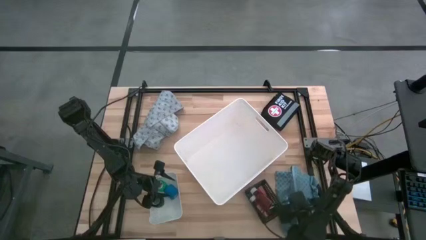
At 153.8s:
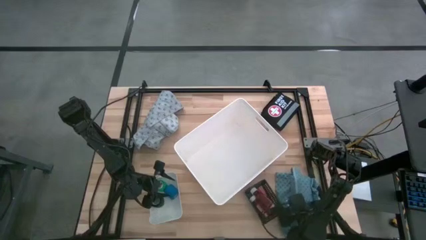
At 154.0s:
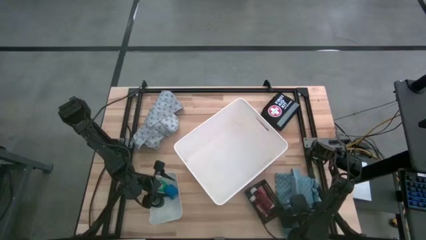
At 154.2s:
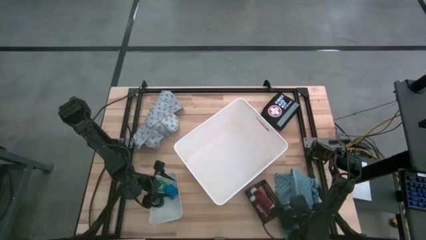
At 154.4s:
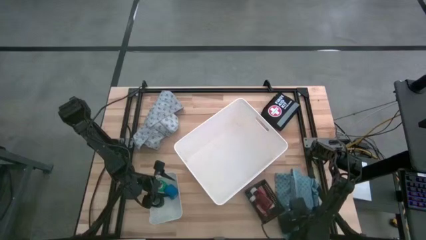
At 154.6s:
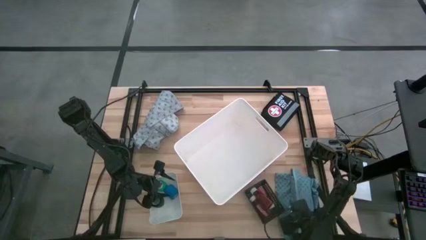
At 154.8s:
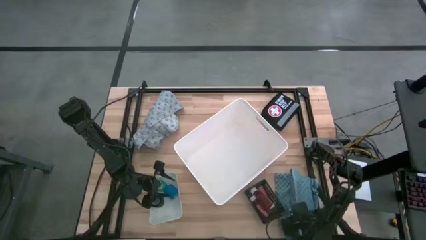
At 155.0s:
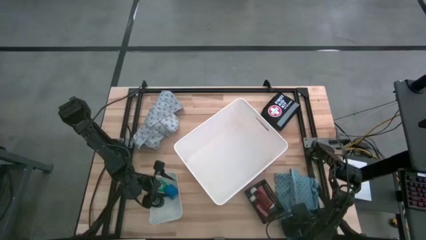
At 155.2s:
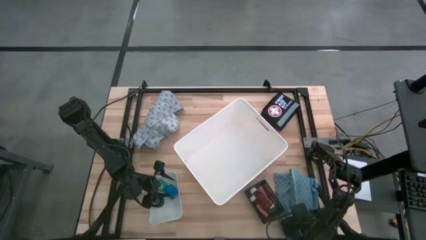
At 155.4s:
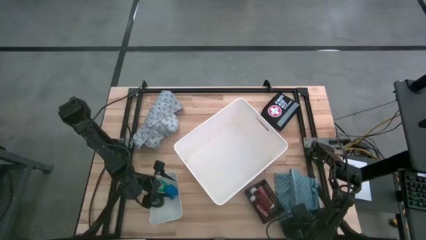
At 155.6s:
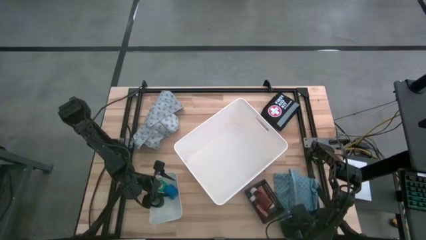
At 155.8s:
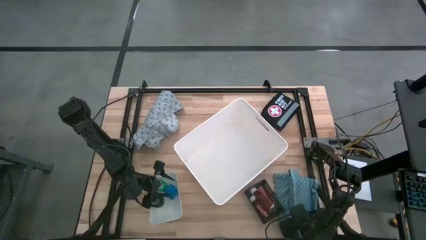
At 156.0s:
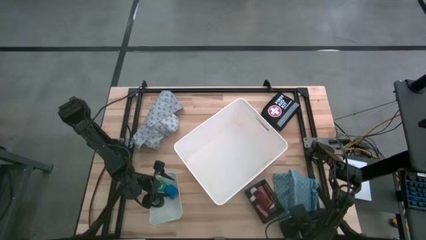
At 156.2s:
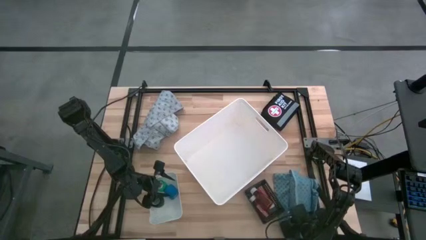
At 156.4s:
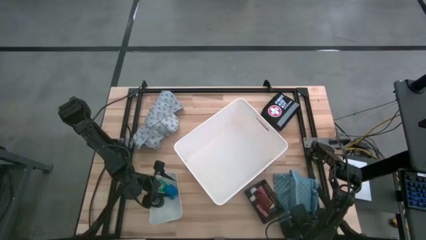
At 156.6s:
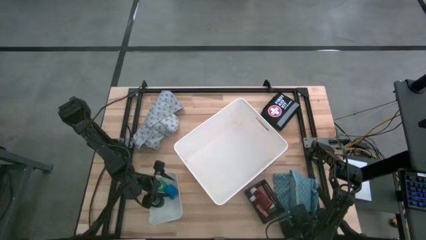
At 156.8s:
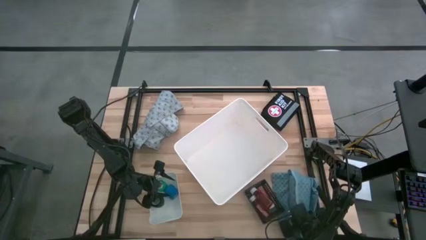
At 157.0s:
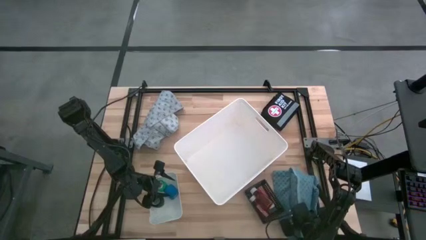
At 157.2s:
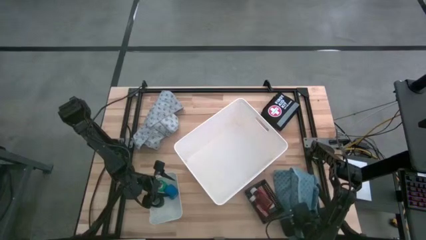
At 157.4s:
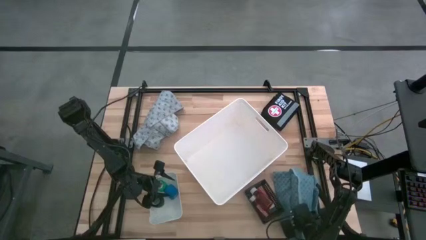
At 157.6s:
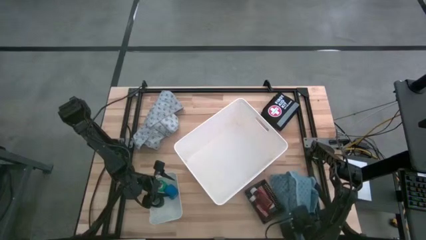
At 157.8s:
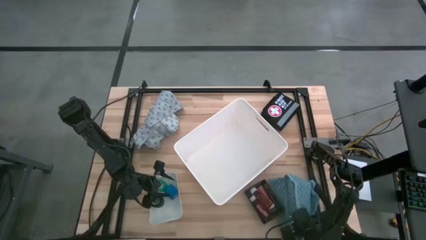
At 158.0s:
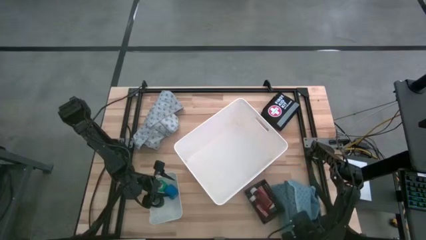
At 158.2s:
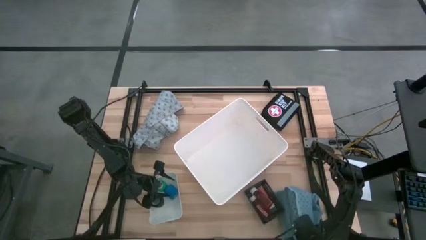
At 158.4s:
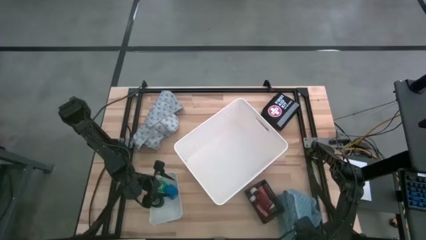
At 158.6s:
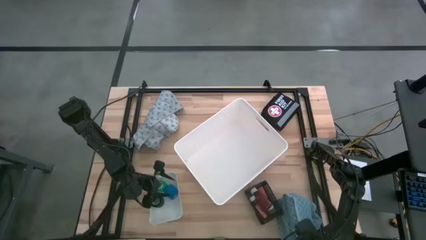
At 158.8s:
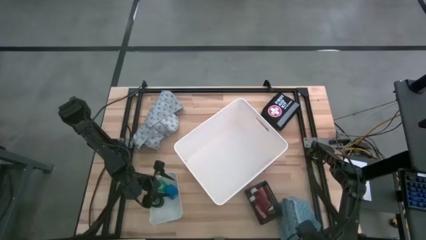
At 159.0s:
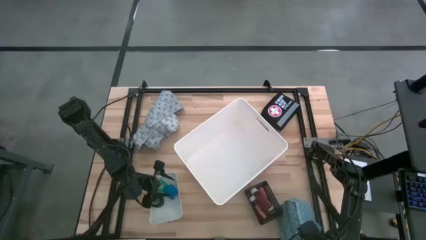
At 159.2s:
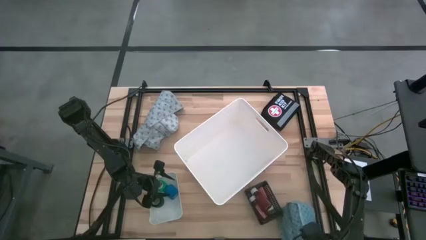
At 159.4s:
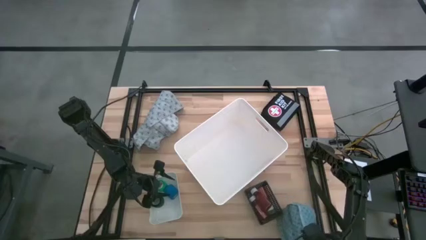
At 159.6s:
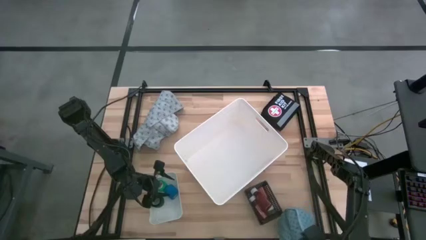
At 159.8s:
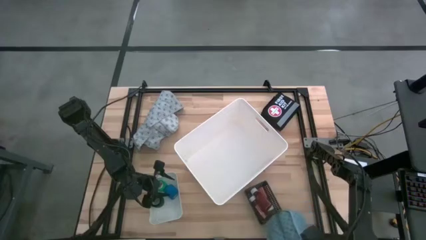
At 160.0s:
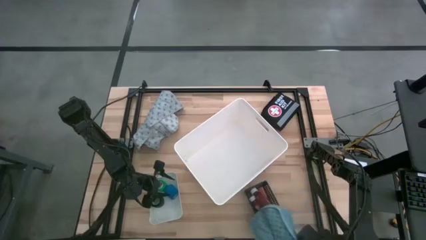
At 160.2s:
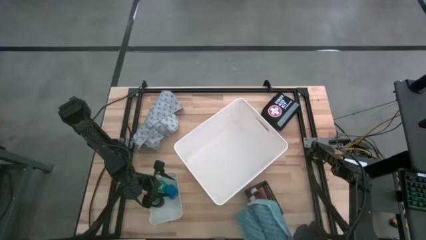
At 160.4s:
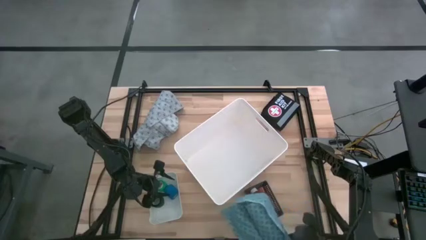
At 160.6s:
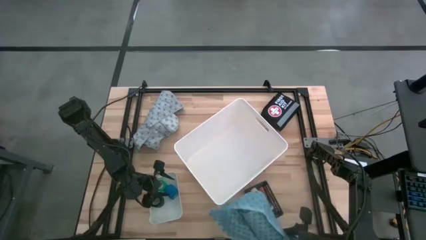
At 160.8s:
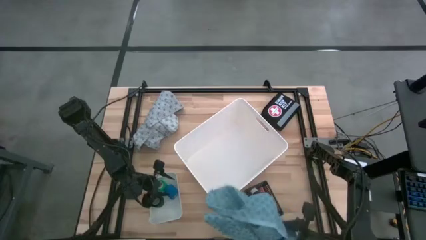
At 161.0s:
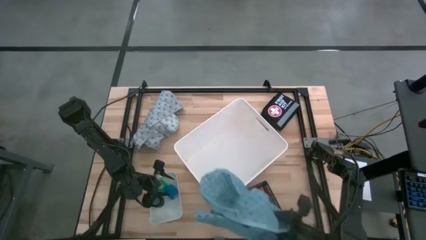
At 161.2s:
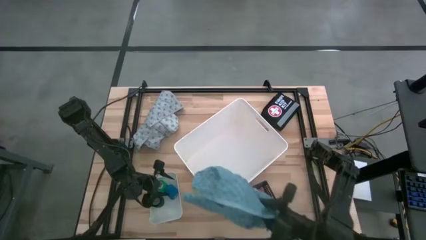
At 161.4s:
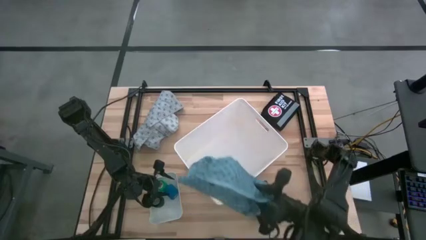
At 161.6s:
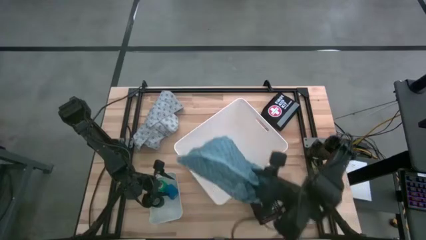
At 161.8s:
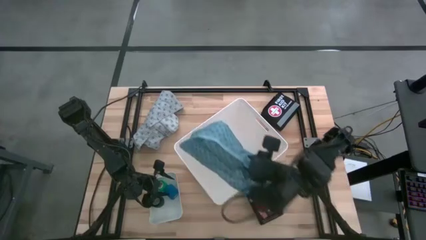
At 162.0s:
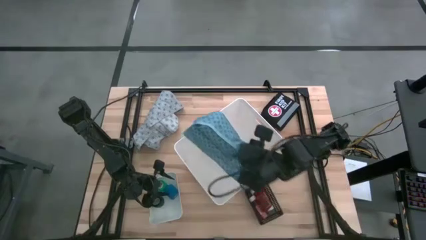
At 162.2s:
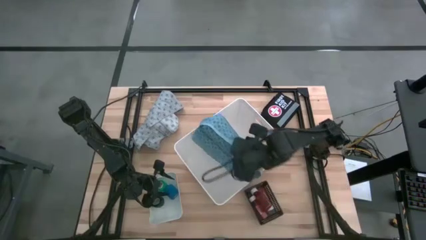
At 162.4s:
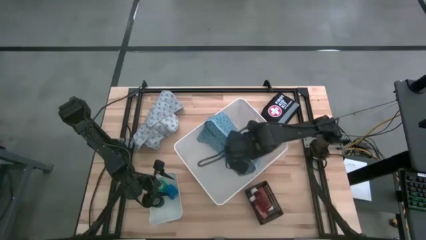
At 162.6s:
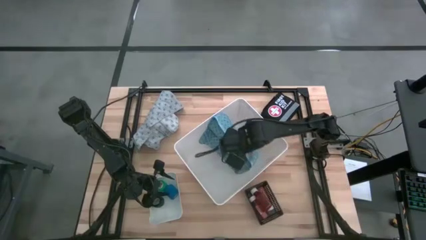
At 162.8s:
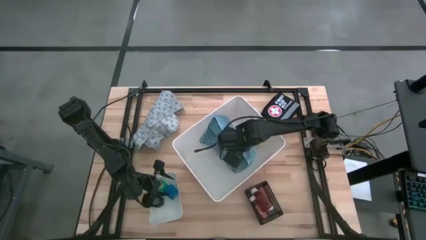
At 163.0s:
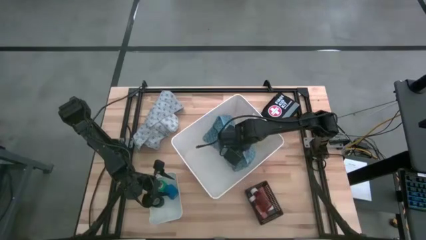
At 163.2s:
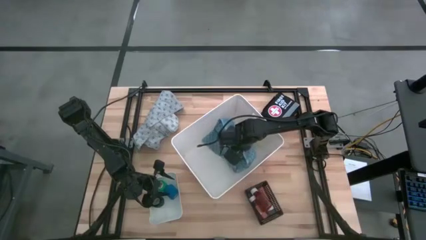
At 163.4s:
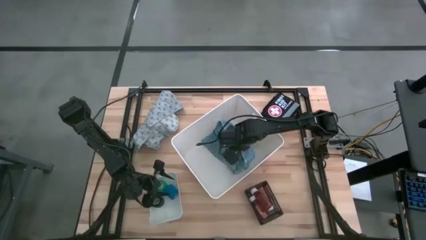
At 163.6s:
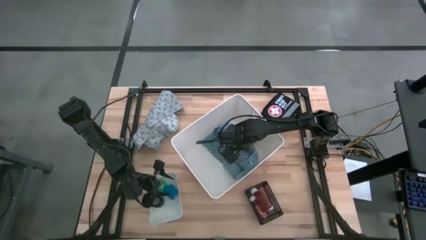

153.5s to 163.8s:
Task: Pick & place medical supplies in basket/bin
Put the blue patient gown into the white laundry bin

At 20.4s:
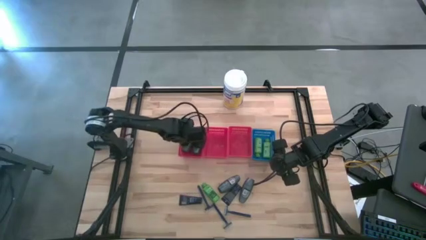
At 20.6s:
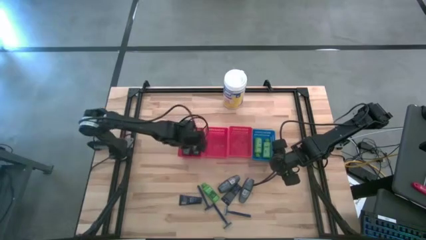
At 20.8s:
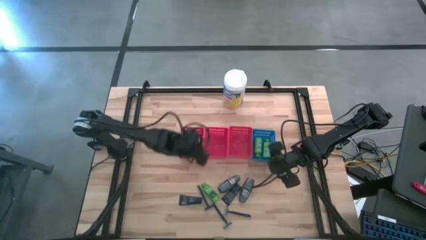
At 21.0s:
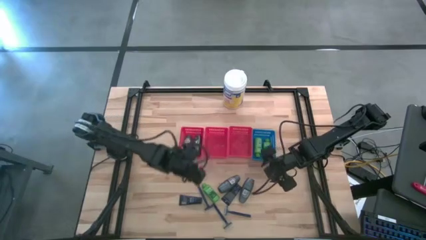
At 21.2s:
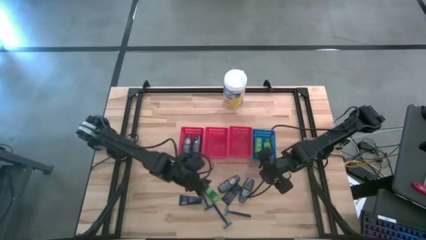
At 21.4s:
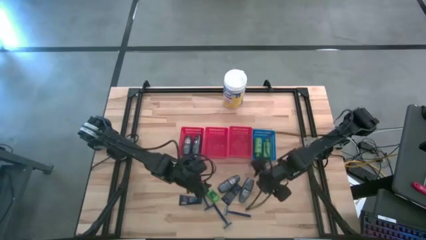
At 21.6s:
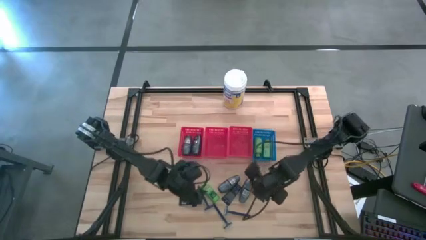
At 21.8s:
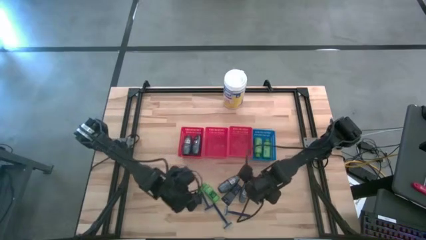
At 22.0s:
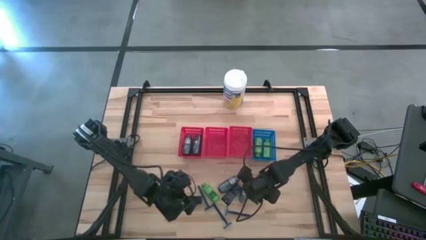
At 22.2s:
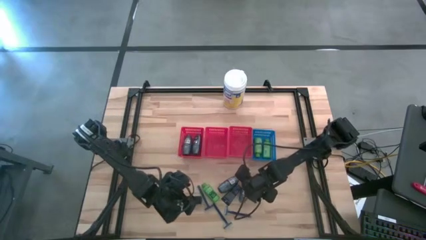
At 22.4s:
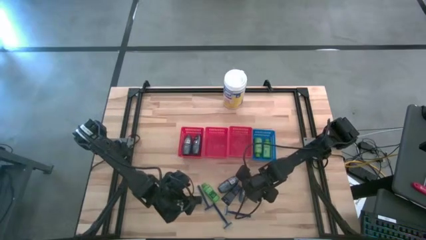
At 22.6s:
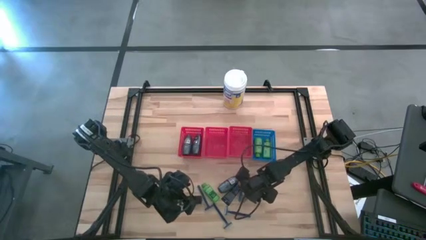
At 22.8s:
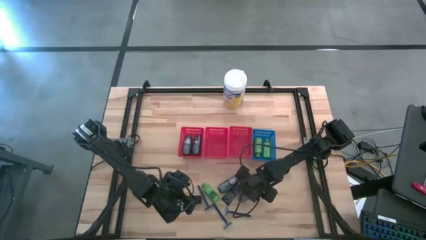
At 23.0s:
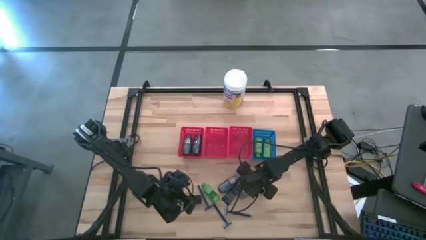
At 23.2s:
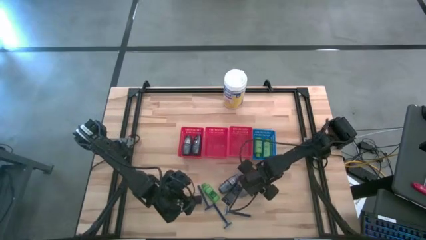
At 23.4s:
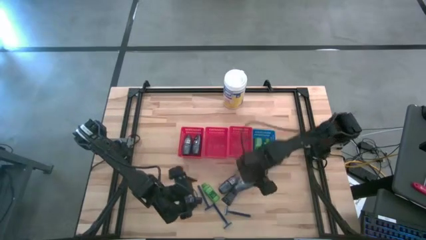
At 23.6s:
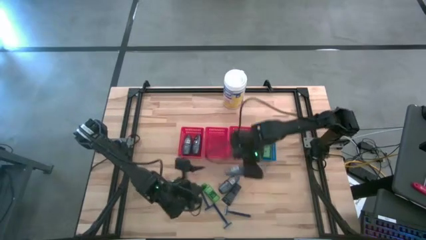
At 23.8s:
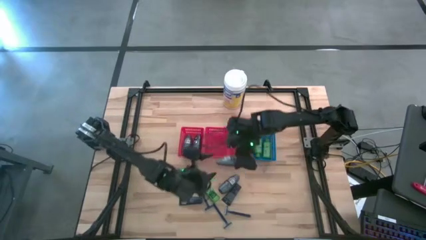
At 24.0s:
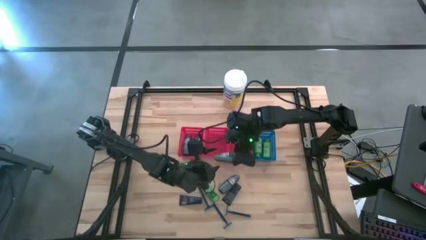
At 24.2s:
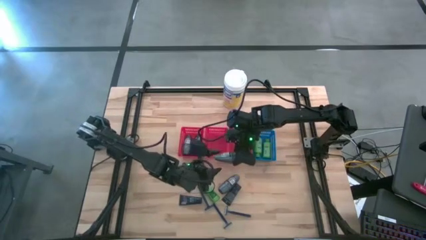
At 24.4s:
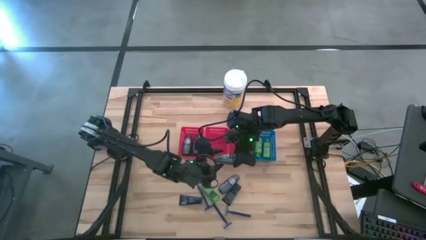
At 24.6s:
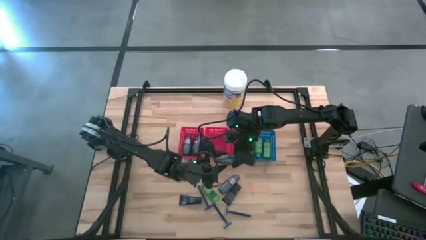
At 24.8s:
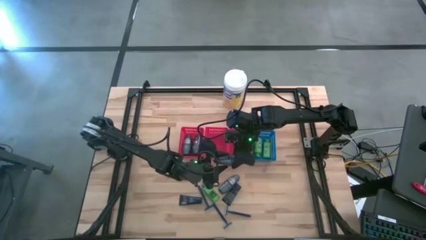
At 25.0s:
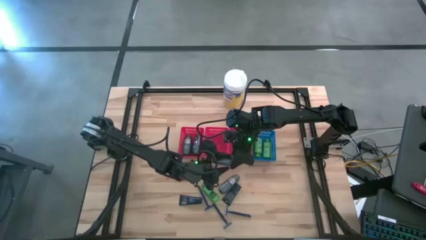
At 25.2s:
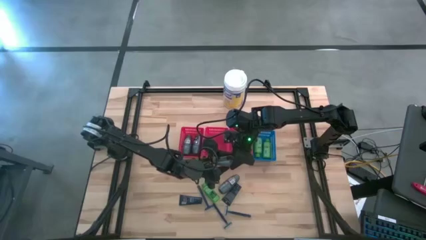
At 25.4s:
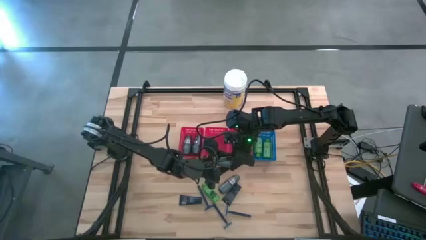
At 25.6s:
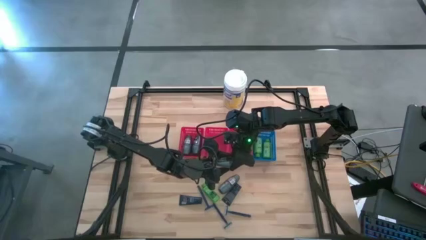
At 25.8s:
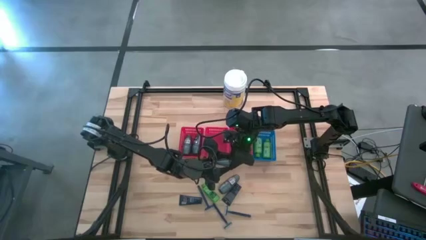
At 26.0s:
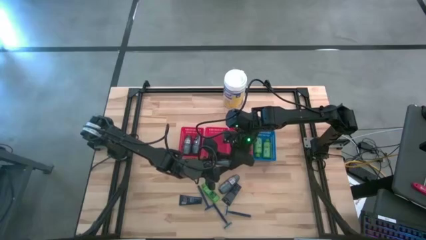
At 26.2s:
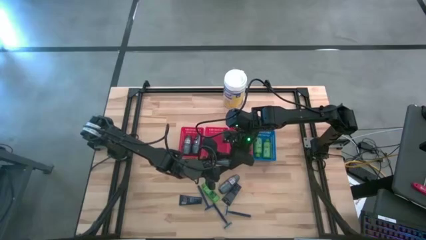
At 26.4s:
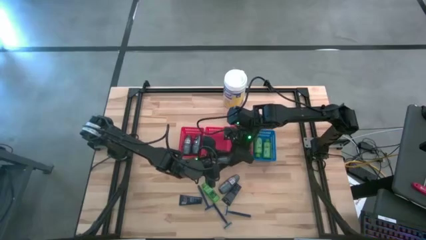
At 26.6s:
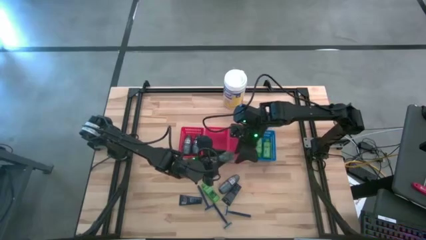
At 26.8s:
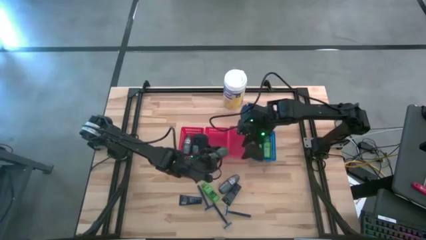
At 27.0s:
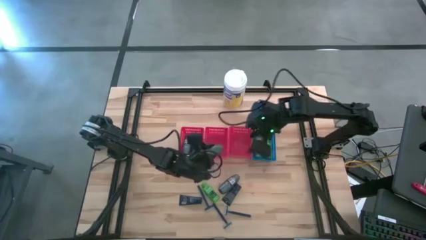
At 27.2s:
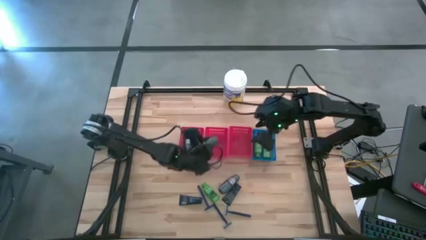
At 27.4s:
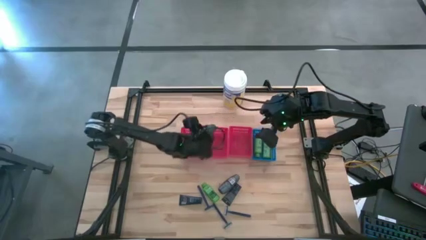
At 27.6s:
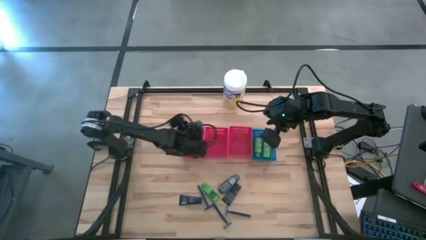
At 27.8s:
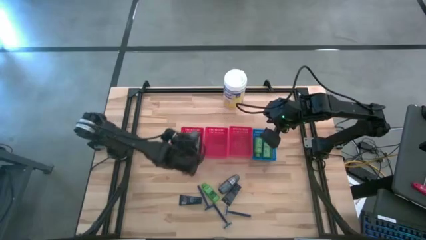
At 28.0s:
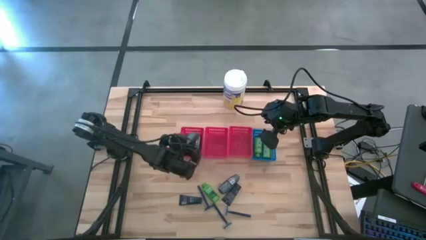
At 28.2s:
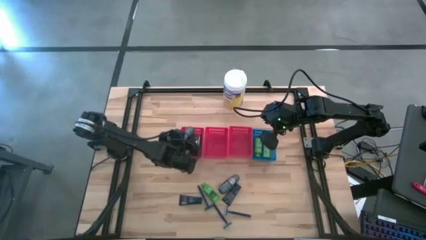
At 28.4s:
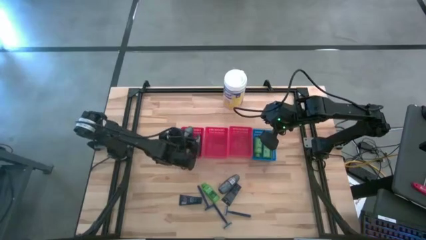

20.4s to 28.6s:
Task: Pick & Place Travel size toiletries
Put the black deodorant into the left red bin
